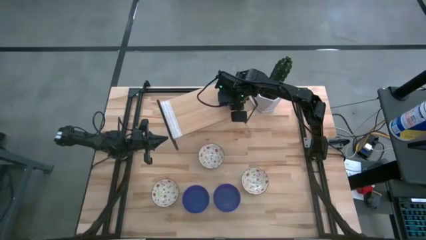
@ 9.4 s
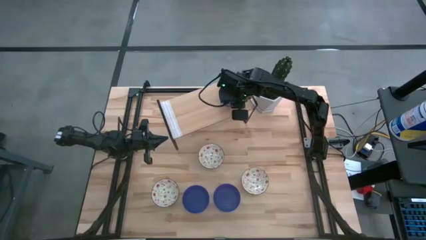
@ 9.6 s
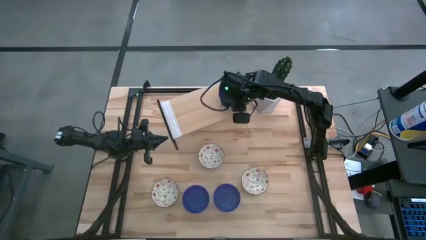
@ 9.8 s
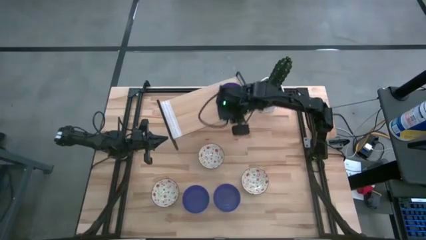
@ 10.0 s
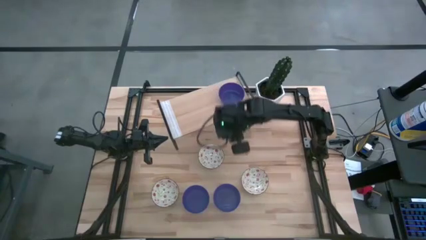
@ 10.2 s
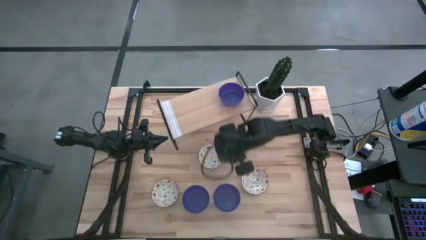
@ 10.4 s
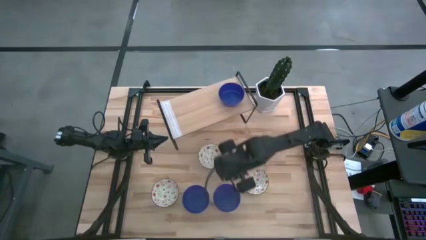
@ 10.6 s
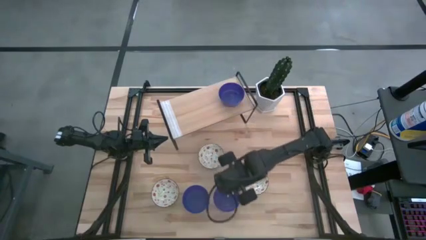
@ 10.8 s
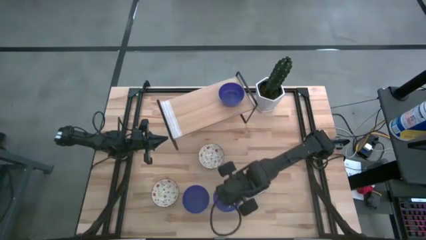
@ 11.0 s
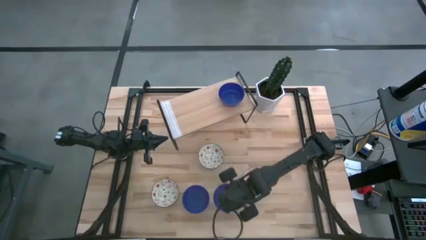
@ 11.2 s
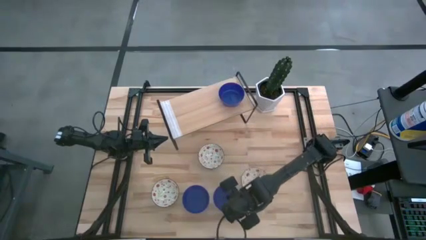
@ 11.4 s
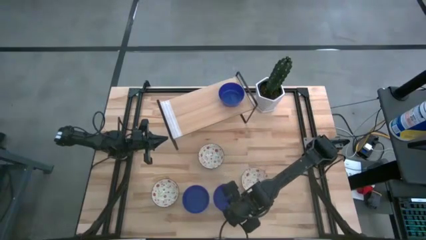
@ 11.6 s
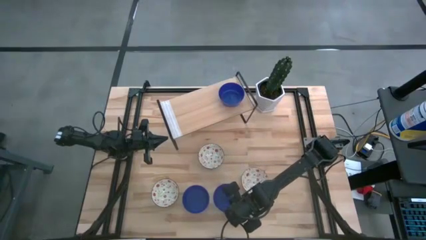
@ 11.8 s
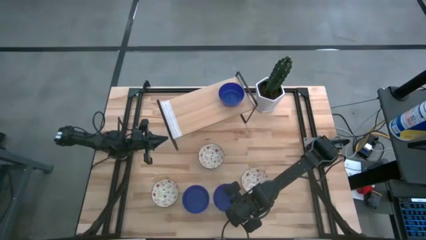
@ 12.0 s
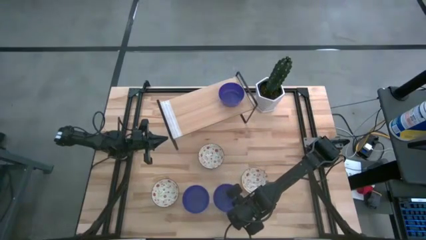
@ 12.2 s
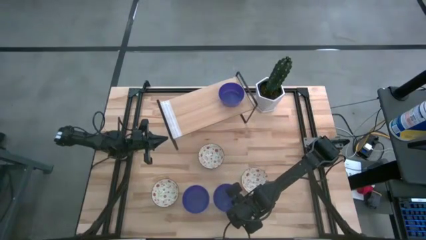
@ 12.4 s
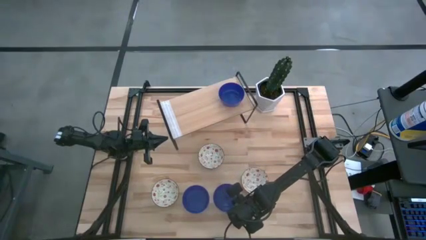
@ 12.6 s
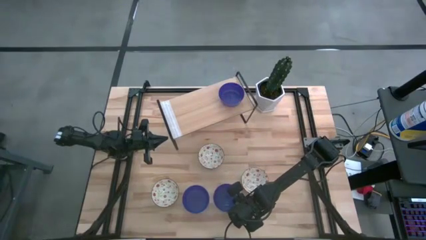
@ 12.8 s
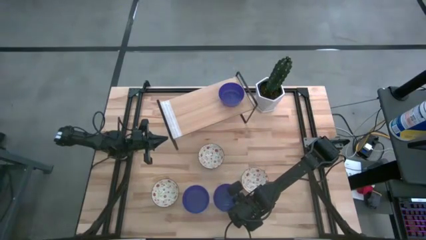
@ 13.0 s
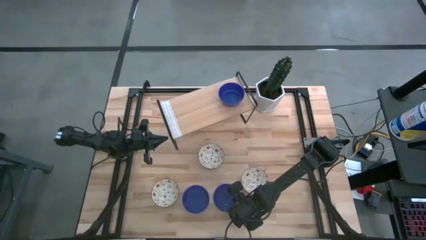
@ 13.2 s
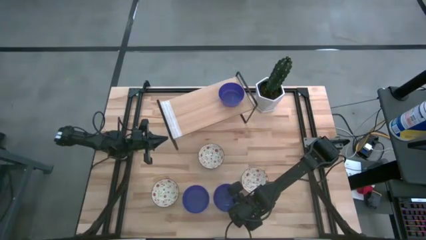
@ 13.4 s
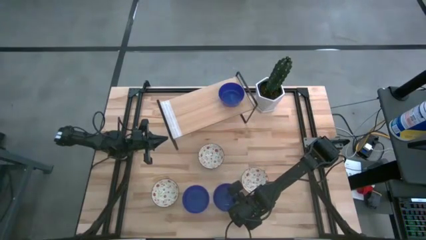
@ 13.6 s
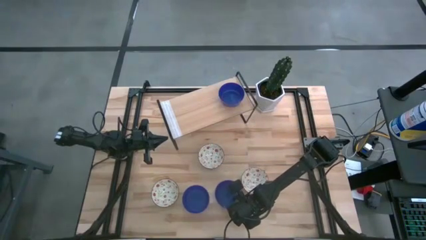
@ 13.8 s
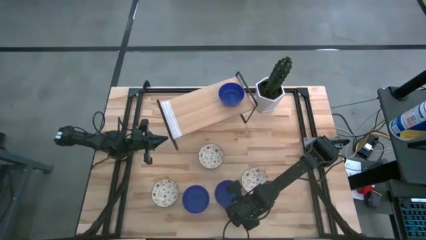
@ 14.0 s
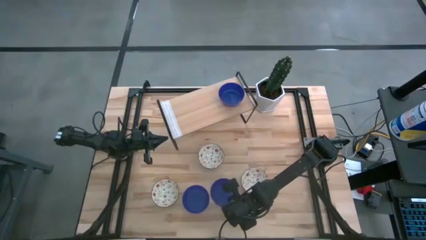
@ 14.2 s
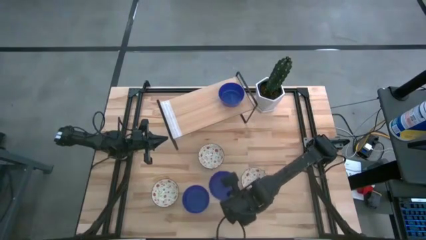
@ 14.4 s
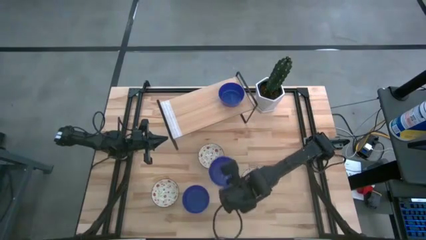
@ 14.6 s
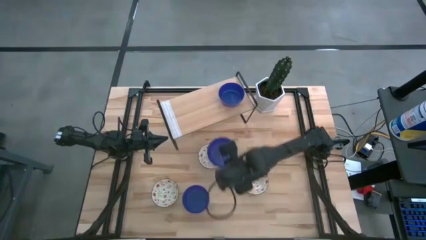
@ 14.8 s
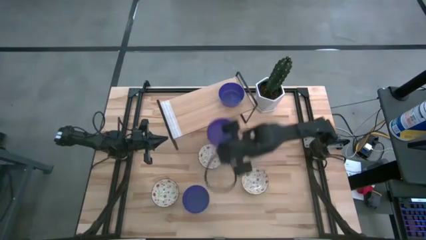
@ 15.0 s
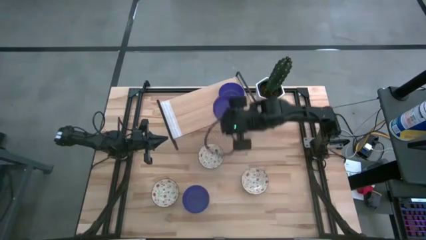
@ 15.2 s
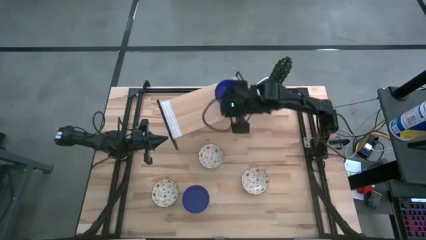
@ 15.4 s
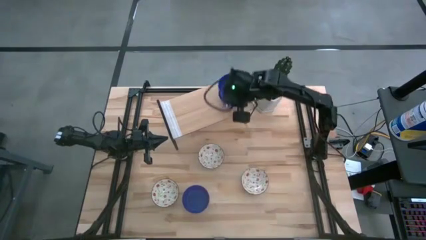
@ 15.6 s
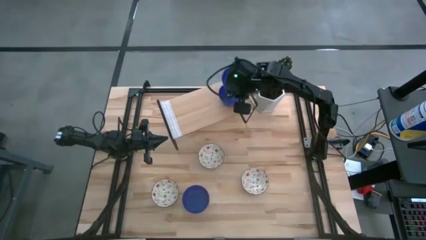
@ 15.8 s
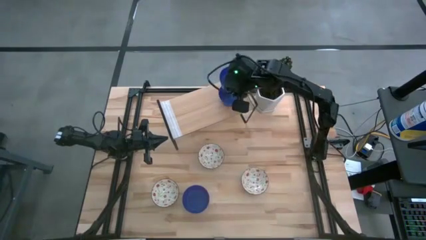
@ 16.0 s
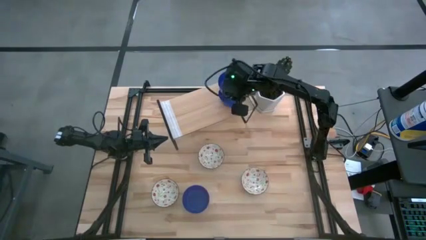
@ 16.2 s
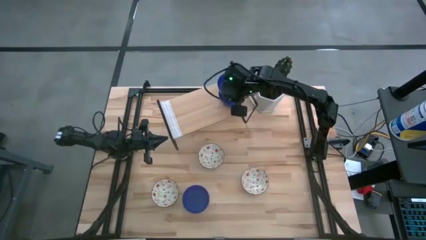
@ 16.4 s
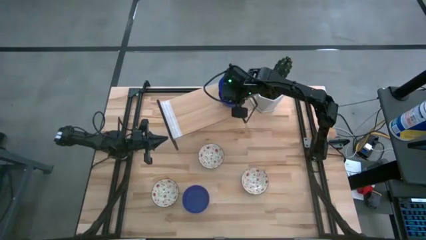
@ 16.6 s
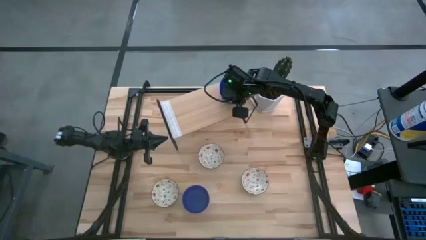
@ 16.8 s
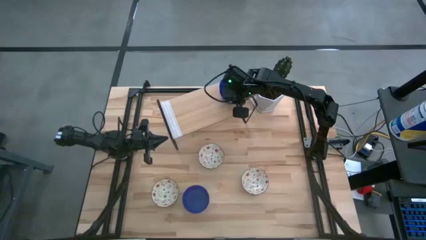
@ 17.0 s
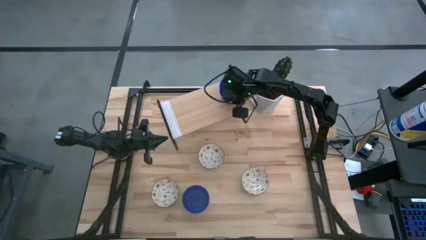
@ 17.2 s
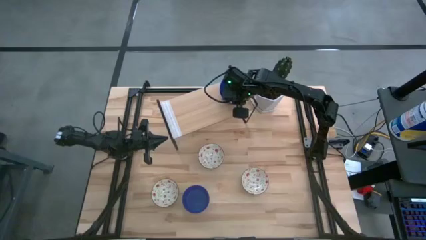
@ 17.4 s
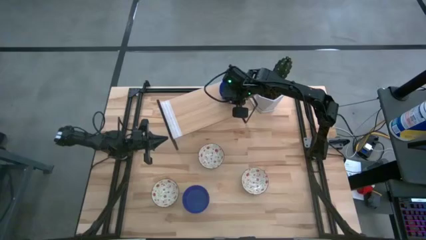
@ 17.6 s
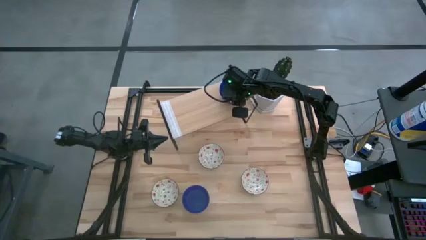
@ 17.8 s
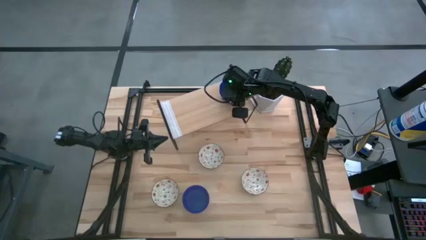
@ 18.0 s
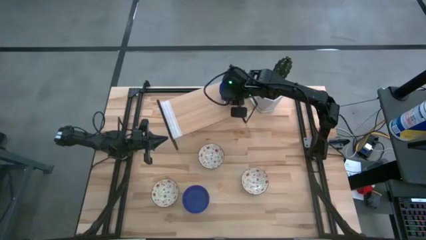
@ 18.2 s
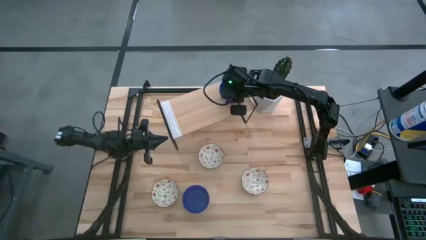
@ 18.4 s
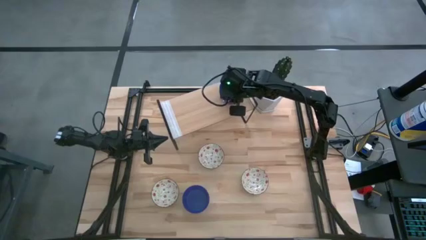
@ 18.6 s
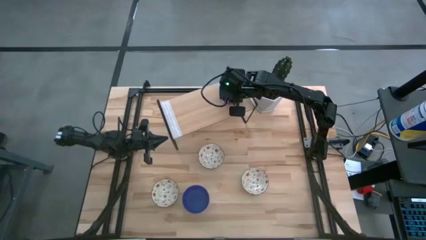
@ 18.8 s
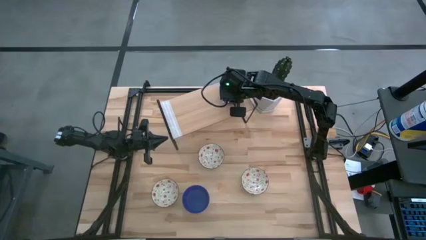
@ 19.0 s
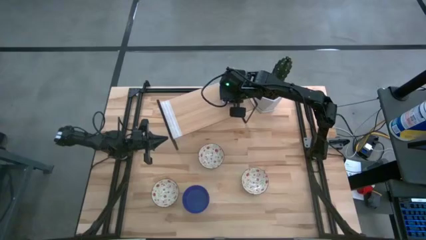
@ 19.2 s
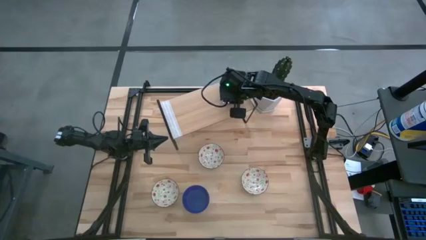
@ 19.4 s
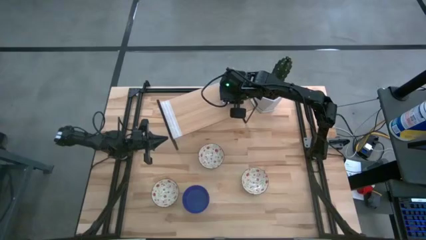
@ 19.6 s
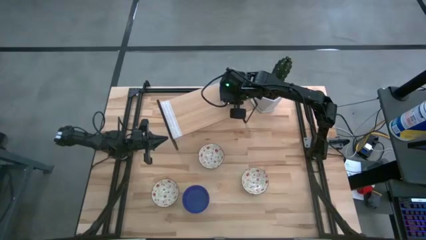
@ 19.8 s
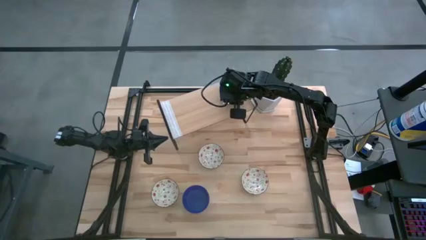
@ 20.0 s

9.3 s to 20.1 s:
Task: Pick & Place Mini bowls
Stack the right blue bowl on top of the blue bowl on the shelf
